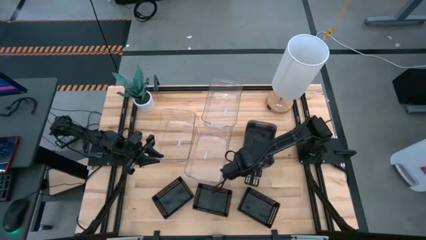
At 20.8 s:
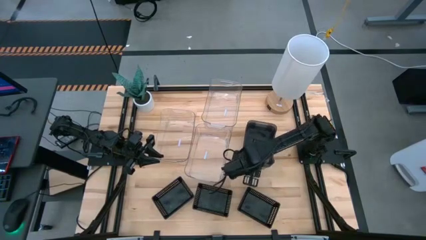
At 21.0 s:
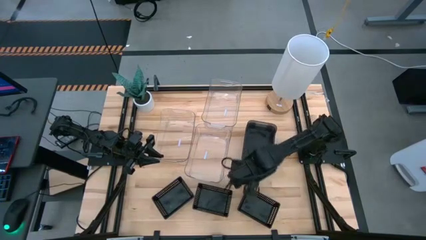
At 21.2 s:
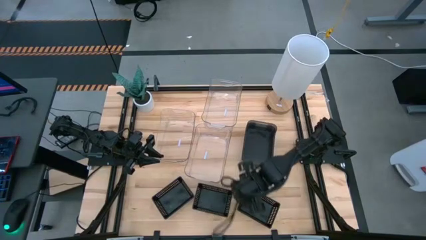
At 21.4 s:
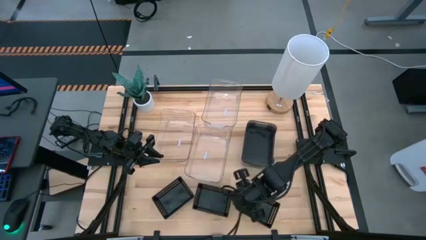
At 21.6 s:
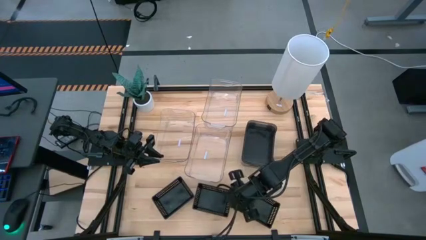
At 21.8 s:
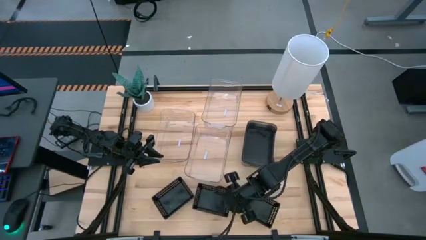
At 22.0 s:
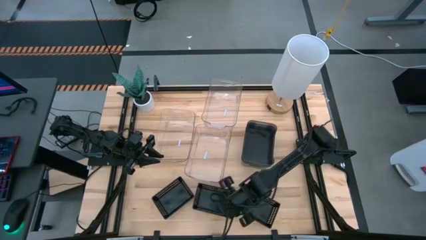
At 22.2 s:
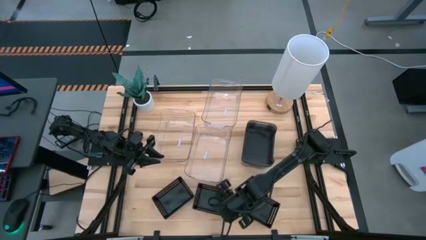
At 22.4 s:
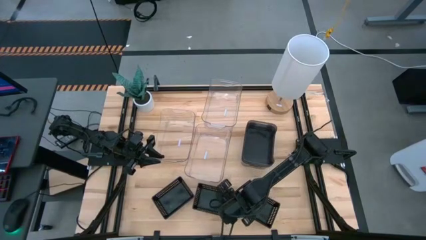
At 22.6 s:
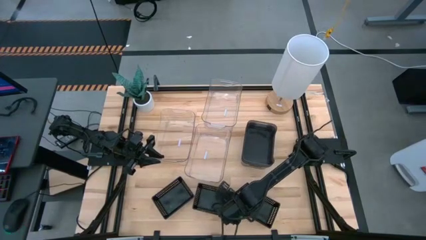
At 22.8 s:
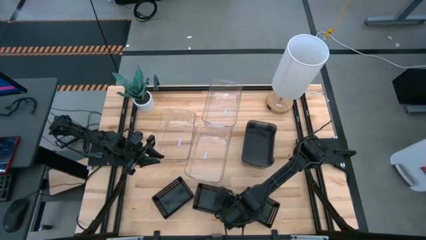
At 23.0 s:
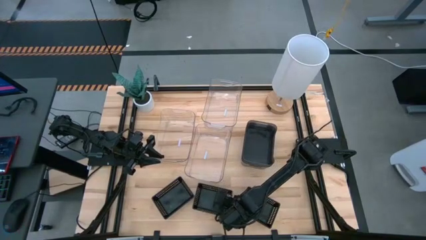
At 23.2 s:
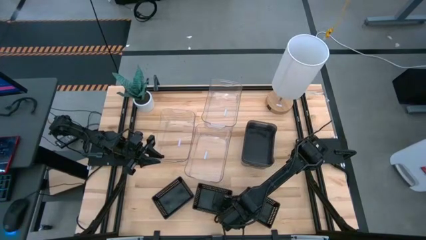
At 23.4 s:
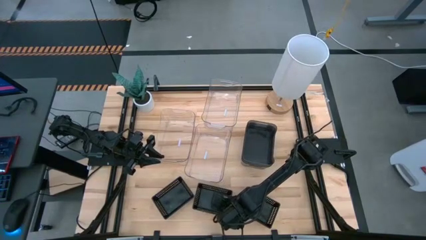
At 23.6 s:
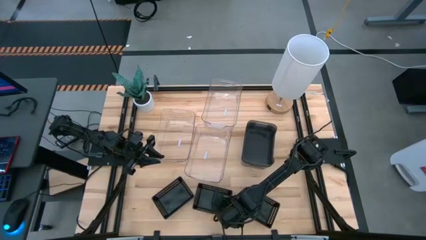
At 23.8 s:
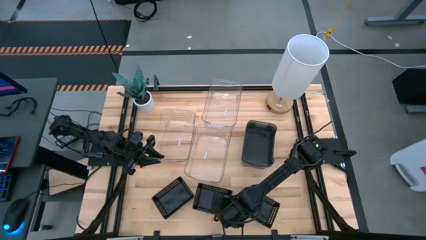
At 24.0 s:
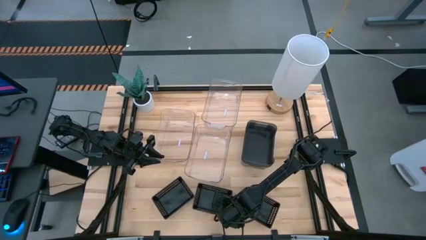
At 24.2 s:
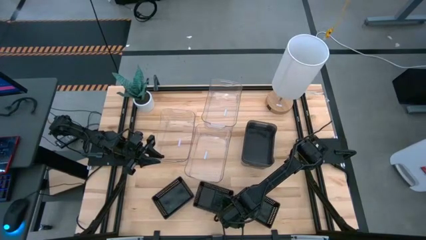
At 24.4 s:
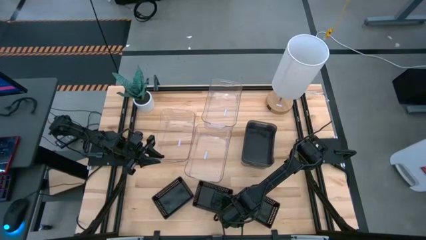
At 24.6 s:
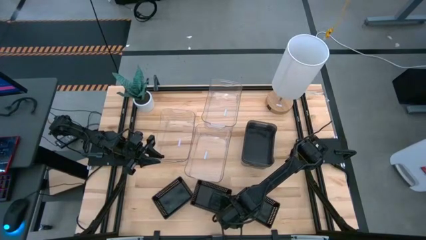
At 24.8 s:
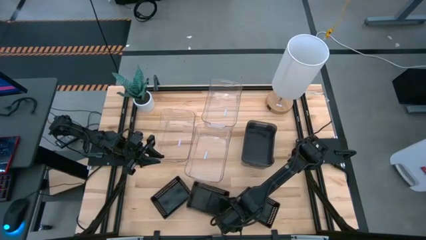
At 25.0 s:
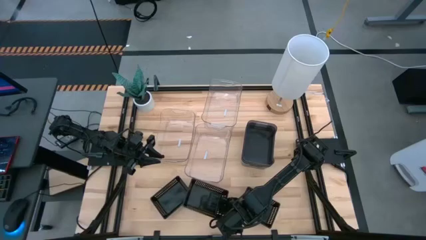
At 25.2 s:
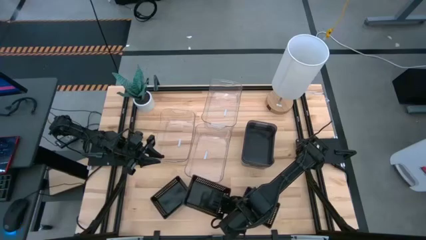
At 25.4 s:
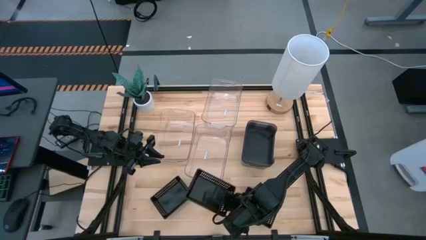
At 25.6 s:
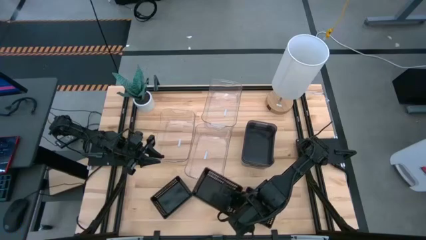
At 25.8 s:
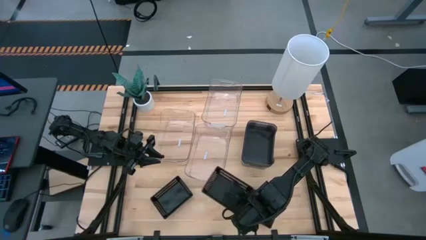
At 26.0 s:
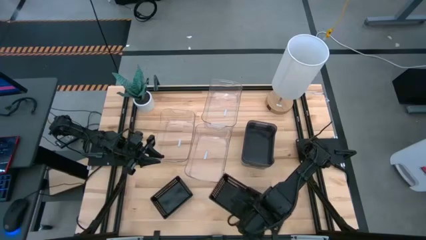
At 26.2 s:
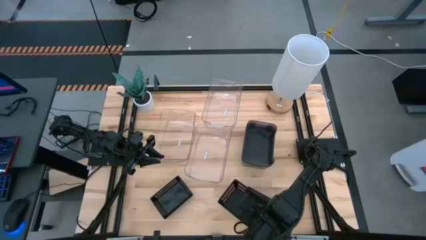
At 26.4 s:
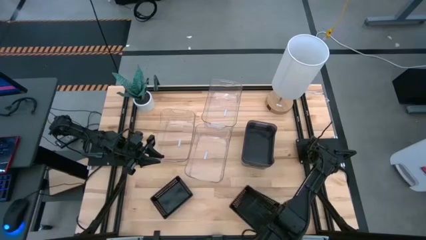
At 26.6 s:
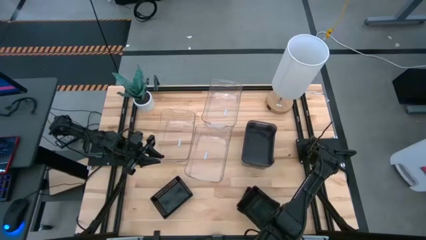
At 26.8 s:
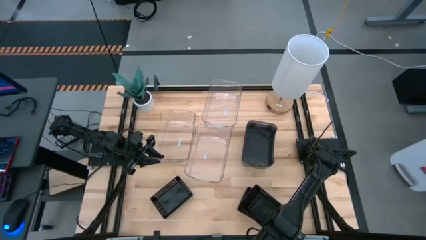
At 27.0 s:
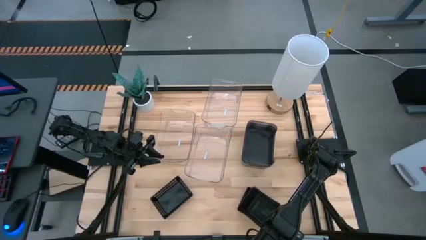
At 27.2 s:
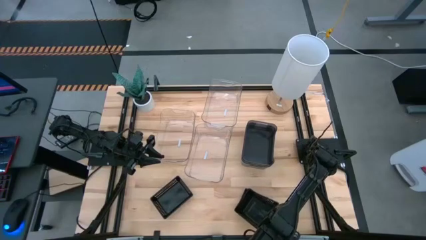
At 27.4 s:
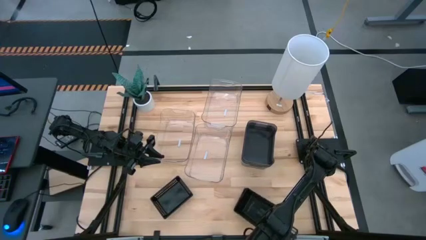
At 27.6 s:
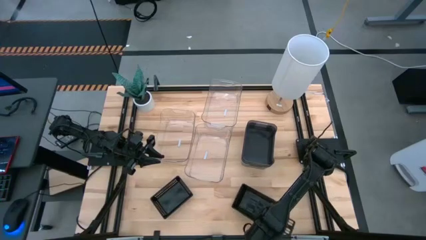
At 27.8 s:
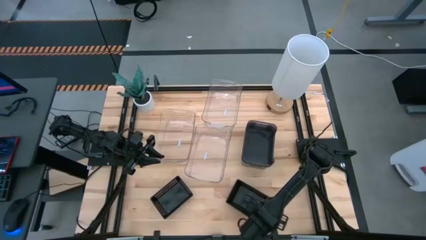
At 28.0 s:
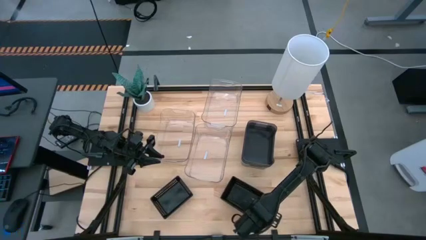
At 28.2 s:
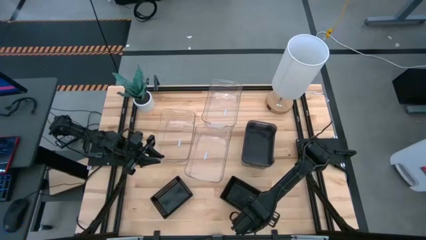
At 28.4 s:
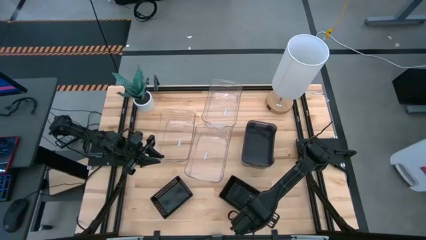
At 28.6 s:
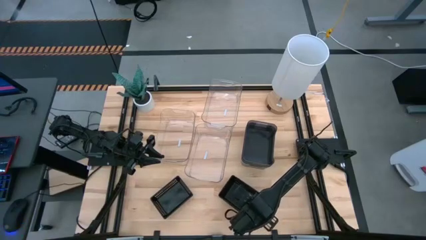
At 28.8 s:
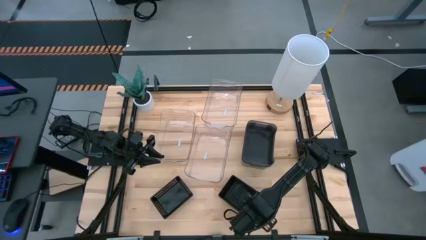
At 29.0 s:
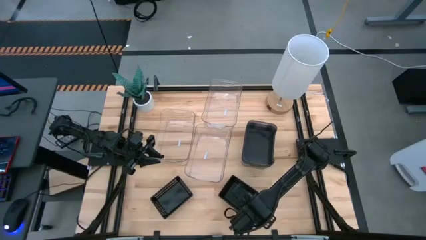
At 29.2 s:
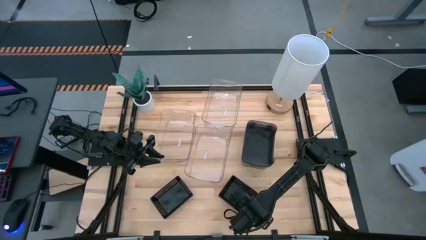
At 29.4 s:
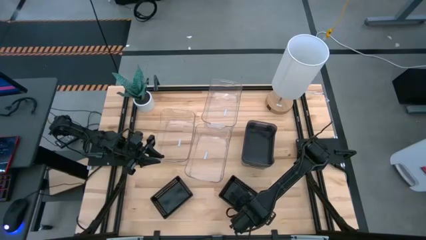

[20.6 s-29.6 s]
Stack the middle black bin on top of the right black bin

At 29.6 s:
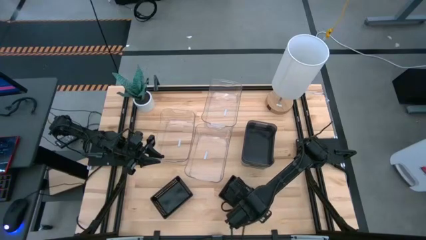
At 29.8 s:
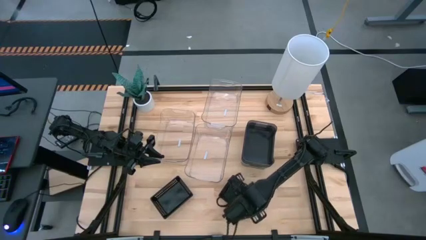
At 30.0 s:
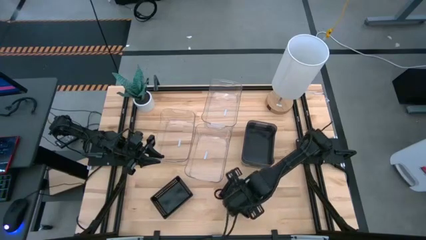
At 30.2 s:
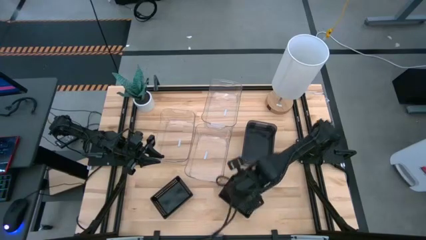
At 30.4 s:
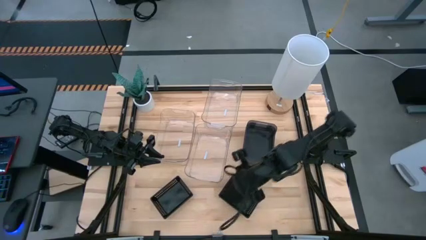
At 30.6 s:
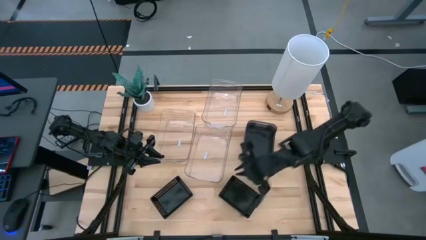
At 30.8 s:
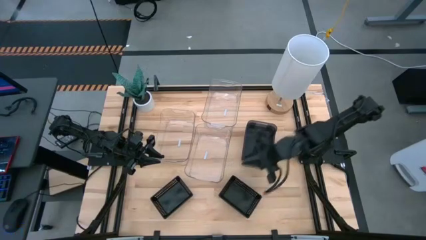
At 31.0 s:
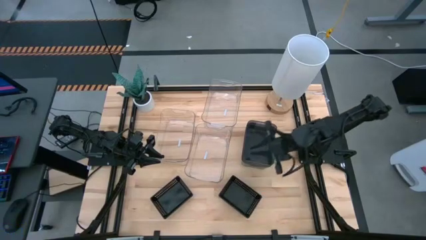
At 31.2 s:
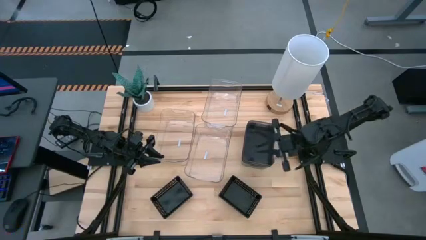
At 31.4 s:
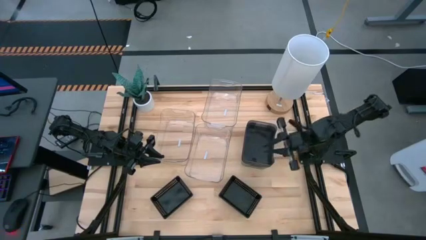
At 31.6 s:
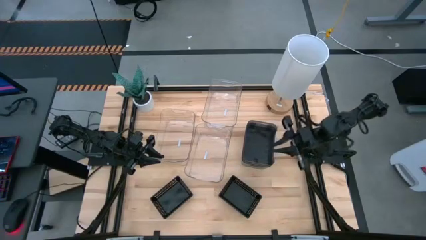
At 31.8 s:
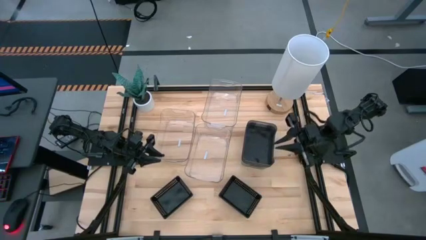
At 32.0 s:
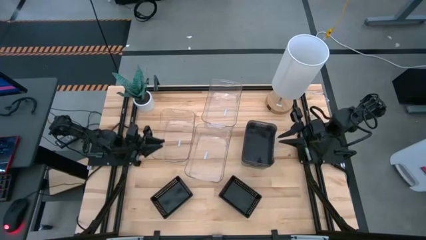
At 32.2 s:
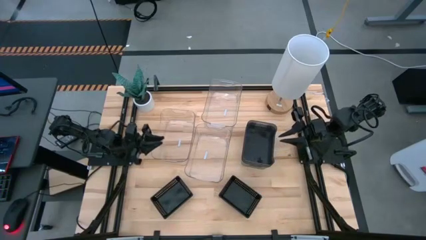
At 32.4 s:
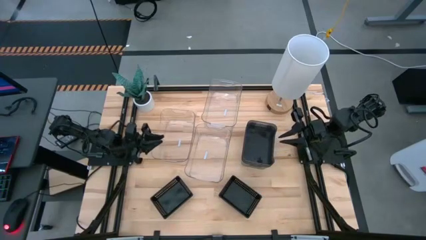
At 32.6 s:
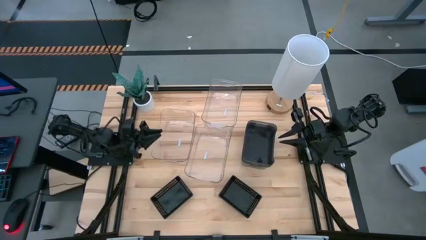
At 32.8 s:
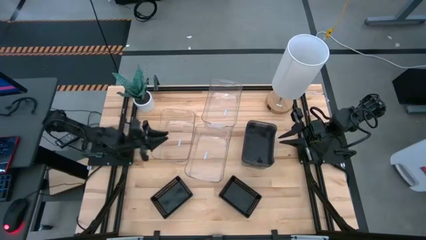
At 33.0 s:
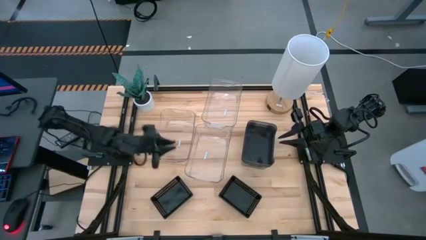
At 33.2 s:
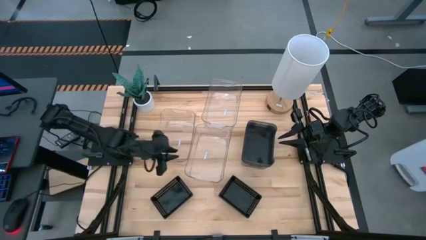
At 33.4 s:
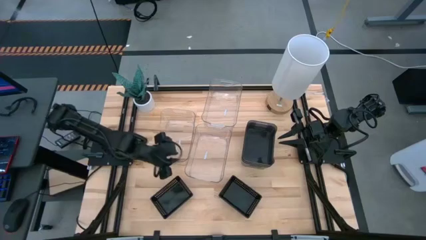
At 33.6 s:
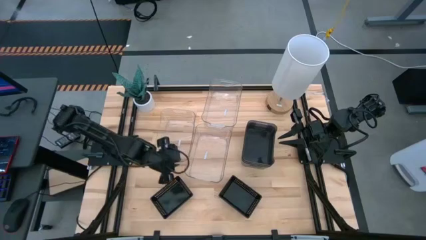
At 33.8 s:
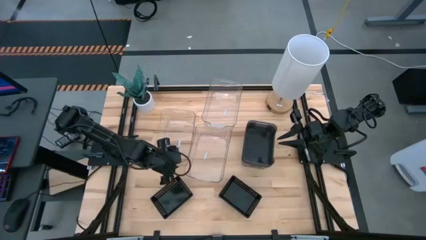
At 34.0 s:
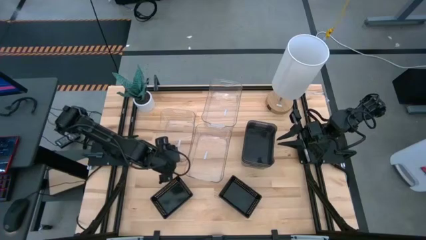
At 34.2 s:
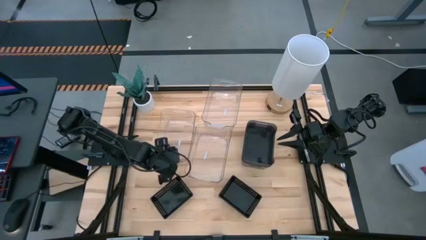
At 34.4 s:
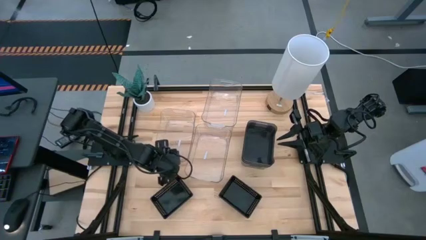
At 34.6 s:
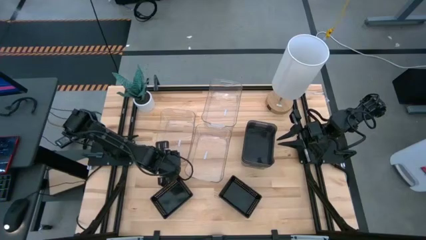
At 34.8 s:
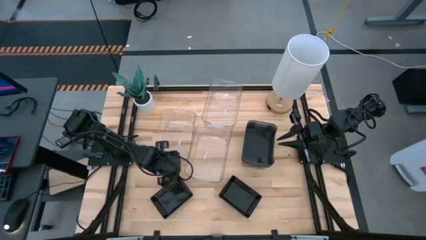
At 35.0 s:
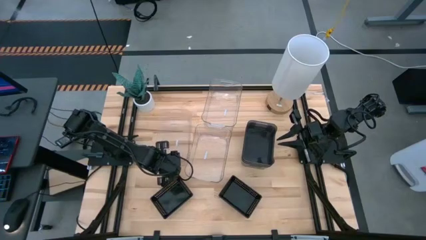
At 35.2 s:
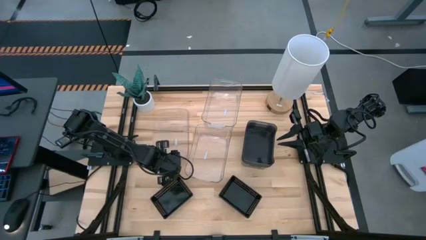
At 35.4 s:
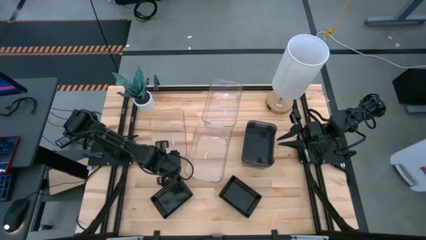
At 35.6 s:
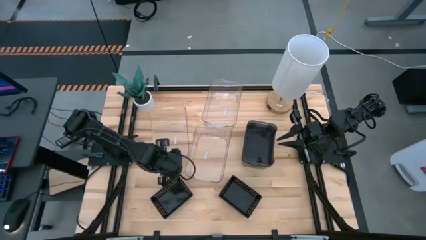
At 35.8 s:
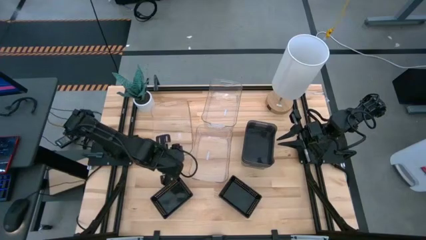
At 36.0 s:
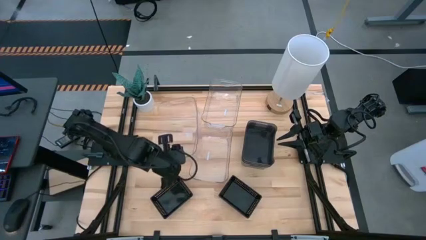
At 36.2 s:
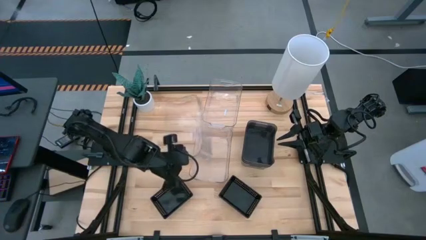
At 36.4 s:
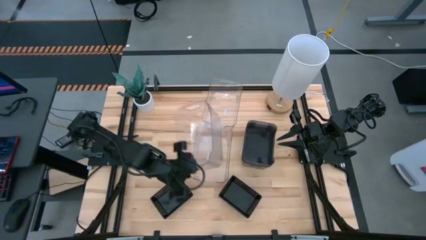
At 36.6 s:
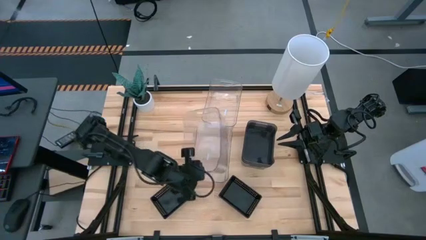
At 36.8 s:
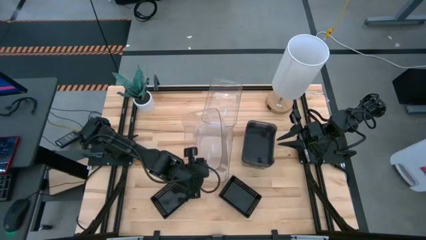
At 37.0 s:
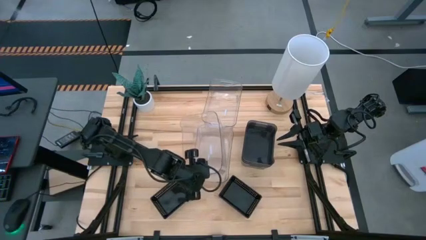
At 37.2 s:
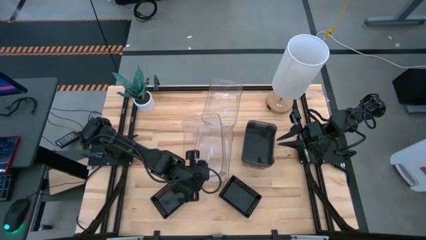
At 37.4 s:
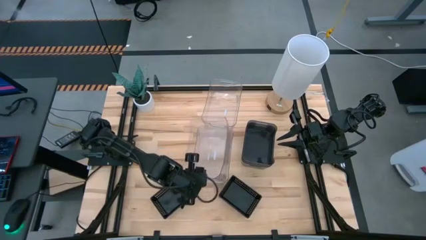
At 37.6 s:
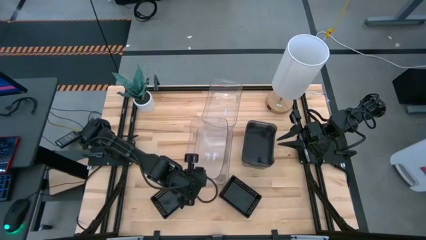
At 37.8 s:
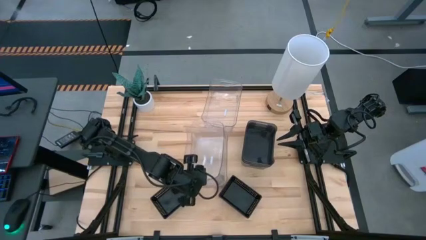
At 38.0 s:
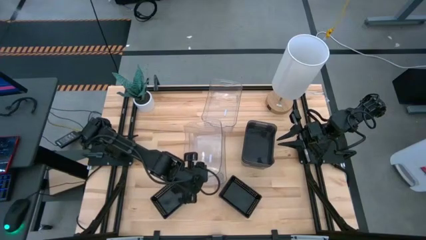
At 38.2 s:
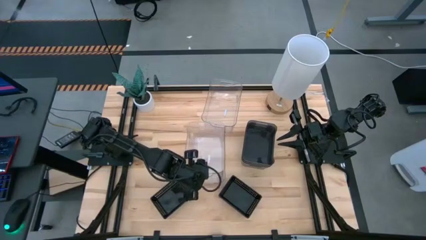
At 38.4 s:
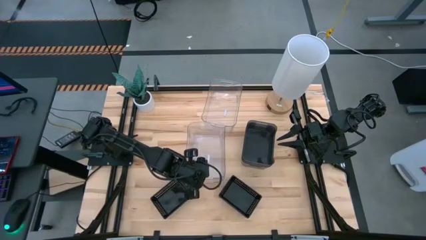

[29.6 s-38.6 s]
Stack the bottom left transparent bin on top of the bottom right transparent bin
